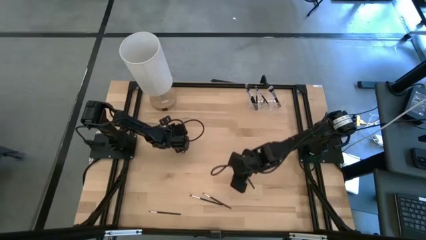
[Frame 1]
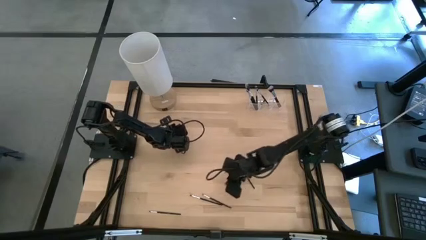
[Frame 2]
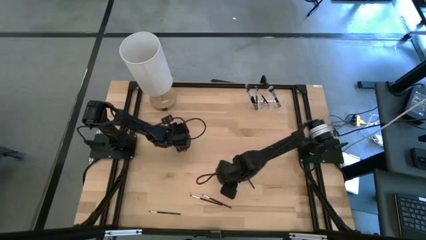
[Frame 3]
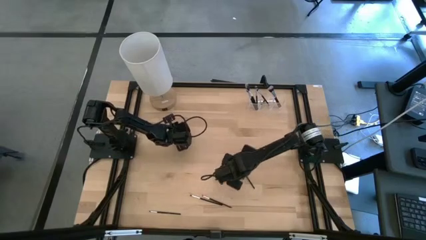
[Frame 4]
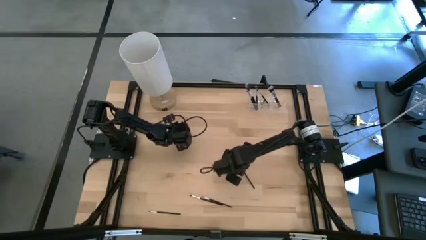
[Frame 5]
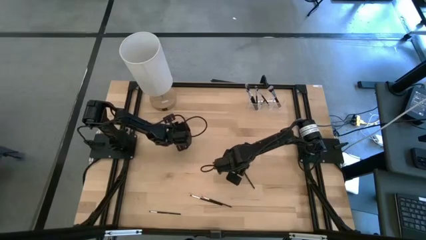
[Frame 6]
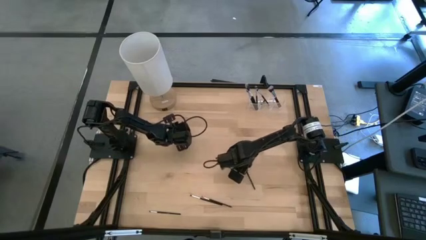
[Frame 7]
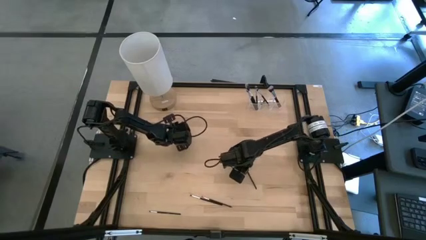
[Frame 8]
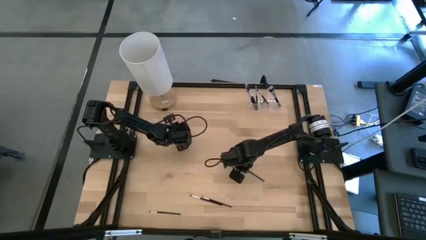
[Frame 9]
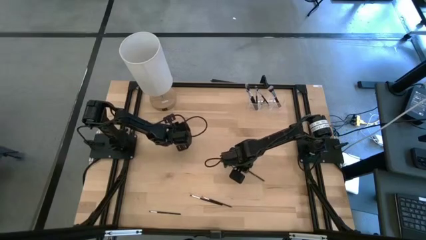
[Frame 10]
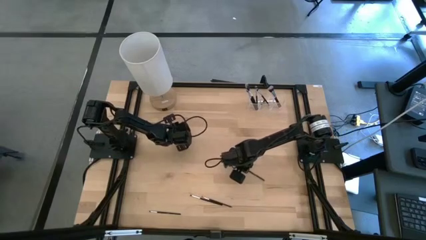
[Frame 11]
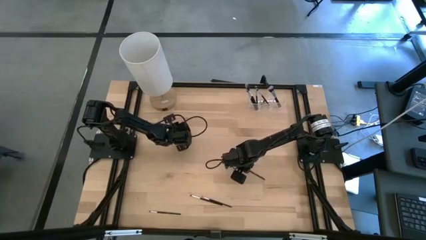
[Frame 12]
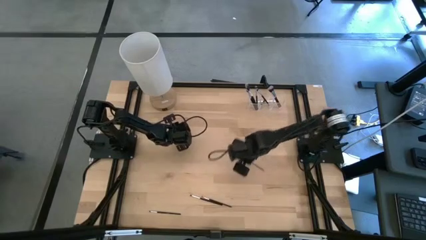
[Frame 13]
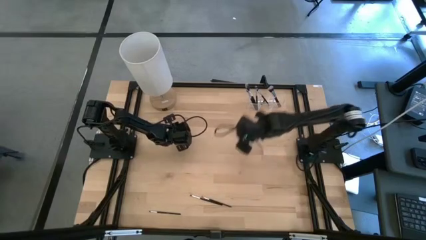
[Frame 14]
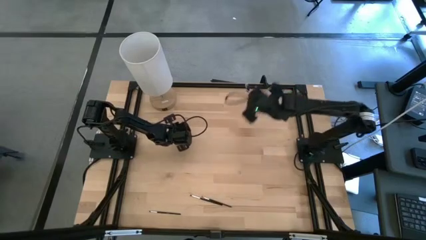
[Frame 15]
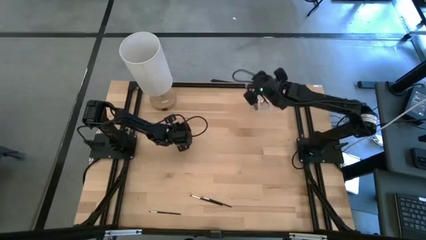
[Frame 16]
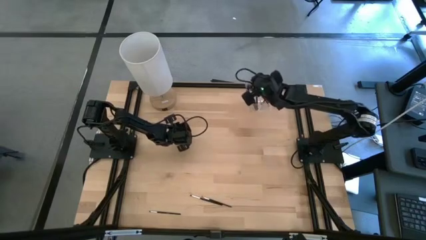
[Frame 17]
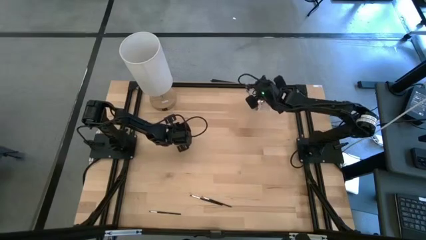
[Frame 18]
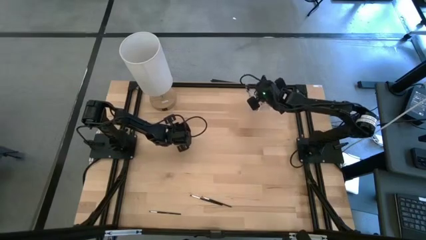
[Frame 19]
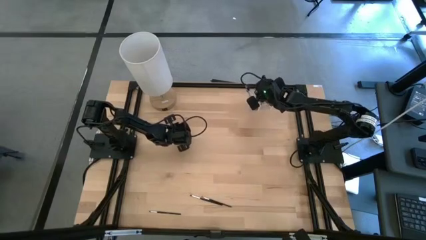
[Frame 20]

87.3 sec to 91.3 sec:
Task: Put items in baskets/containers
Put the eyeshadow brush into the middle of the transparent organizer

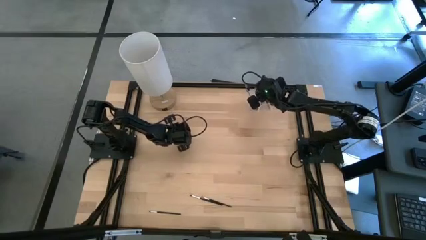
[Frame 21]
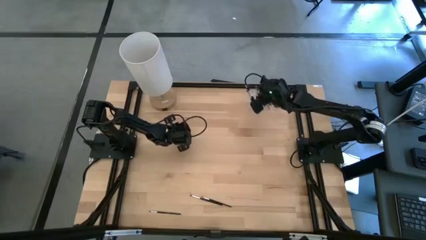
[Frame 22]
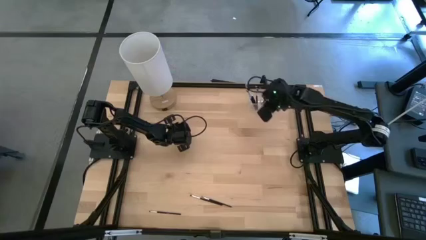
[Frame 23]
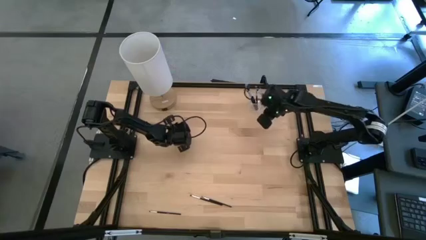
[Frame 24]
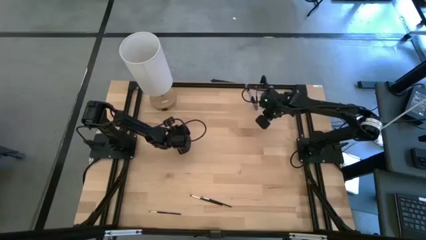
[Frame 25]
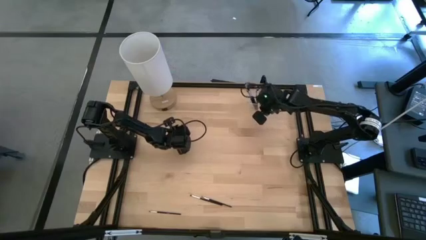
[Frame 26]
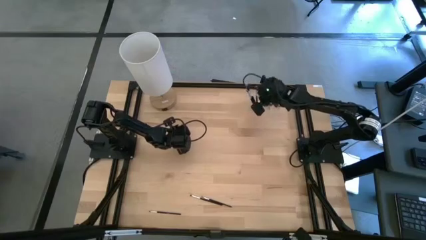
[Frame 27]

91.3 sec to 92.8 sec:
Adjust the eyeshadow brush in the middle of the transparent organizer

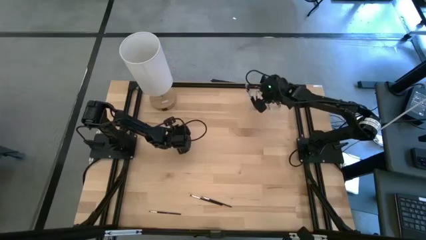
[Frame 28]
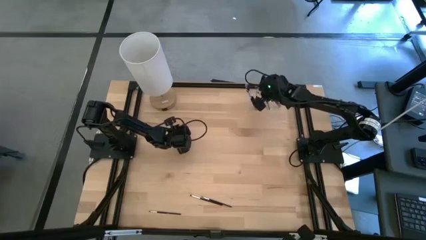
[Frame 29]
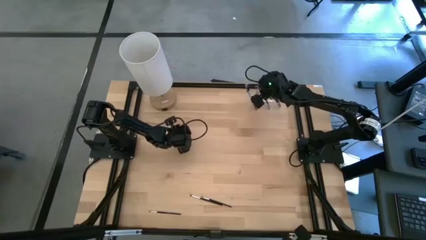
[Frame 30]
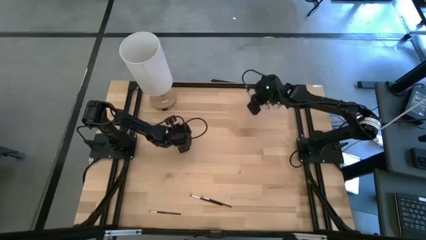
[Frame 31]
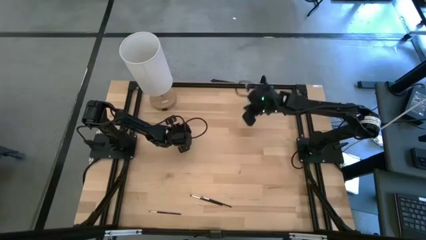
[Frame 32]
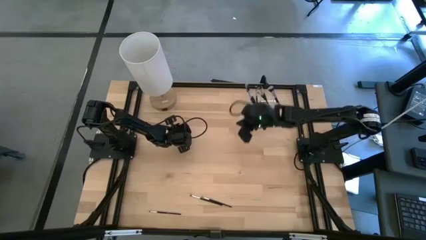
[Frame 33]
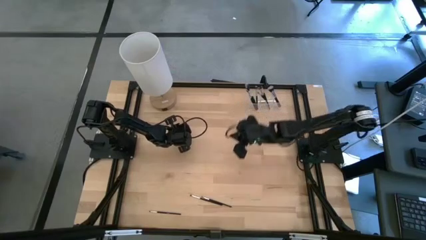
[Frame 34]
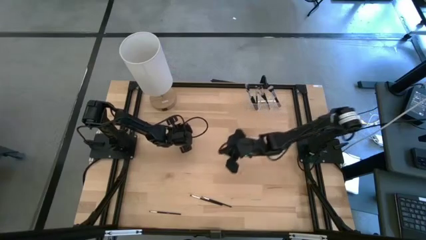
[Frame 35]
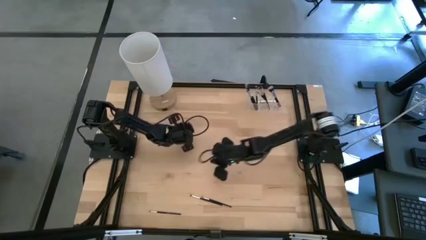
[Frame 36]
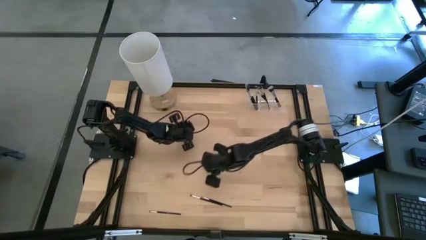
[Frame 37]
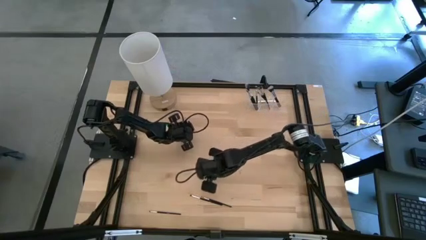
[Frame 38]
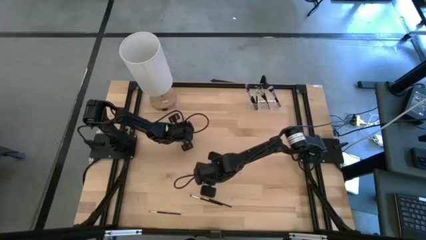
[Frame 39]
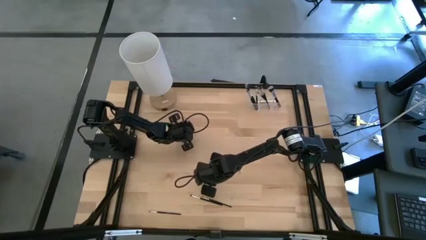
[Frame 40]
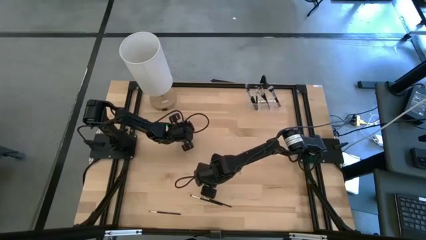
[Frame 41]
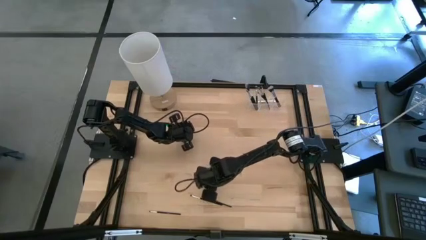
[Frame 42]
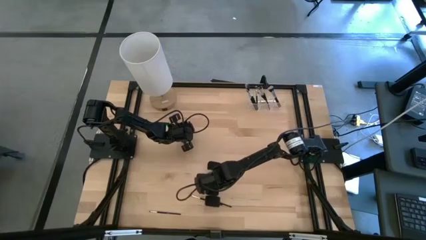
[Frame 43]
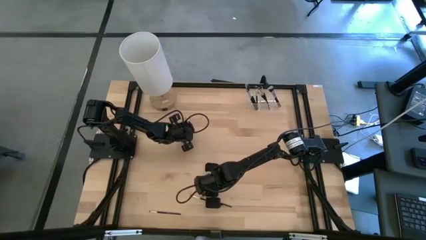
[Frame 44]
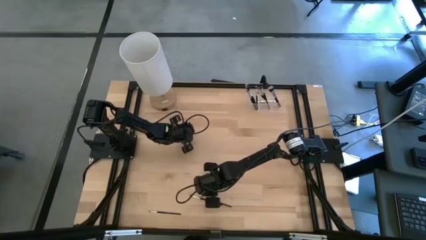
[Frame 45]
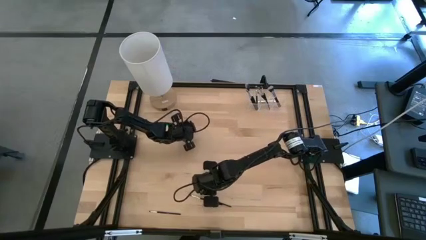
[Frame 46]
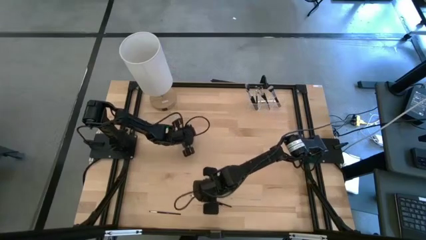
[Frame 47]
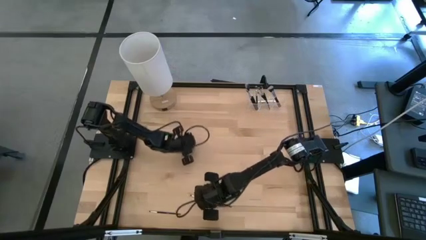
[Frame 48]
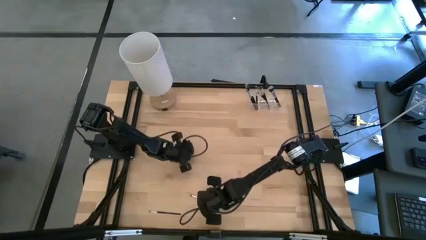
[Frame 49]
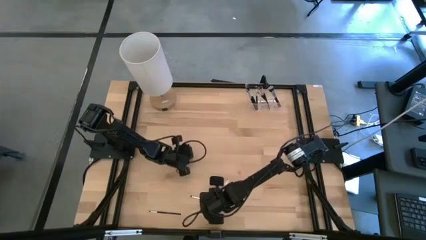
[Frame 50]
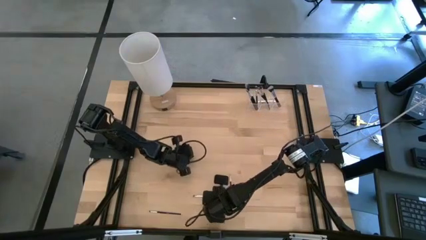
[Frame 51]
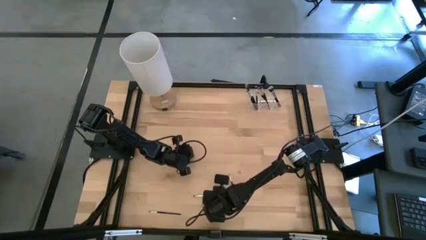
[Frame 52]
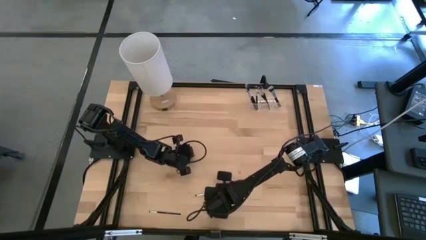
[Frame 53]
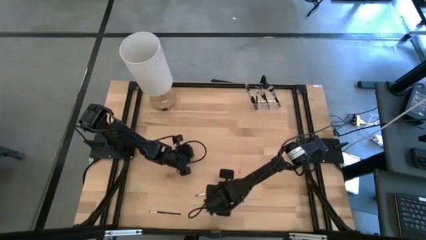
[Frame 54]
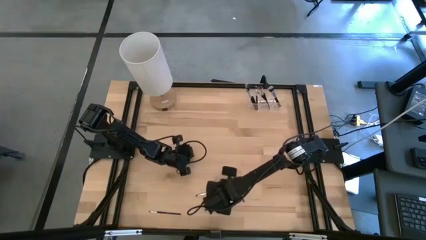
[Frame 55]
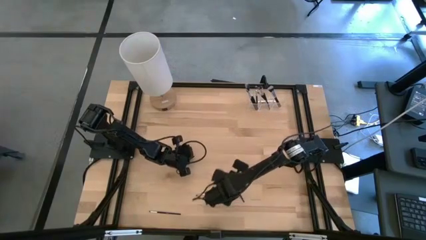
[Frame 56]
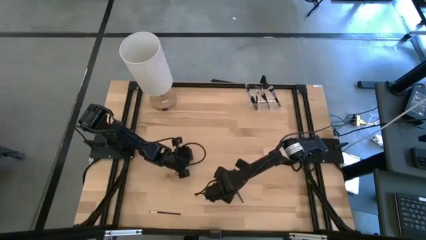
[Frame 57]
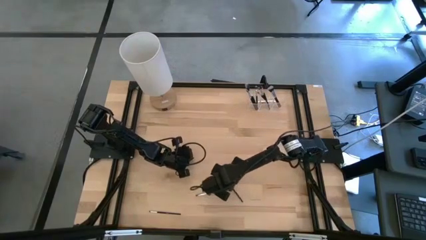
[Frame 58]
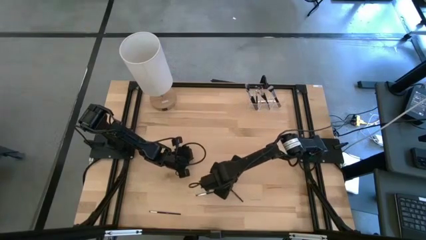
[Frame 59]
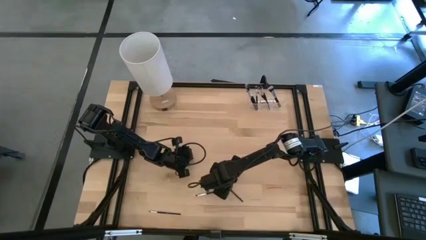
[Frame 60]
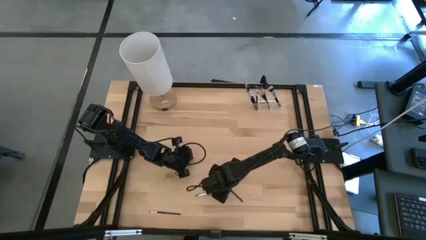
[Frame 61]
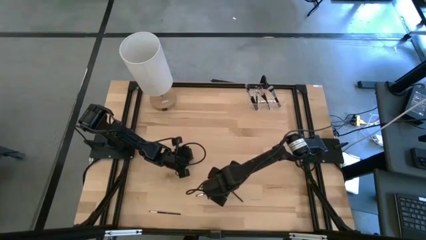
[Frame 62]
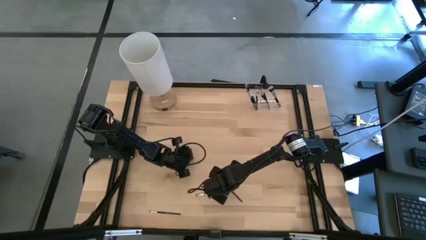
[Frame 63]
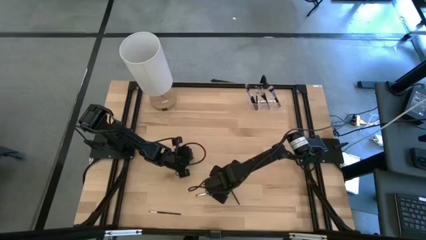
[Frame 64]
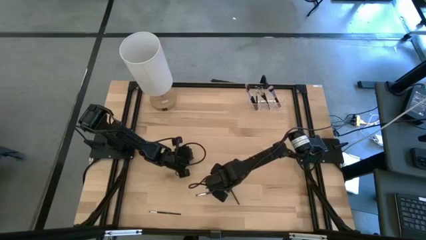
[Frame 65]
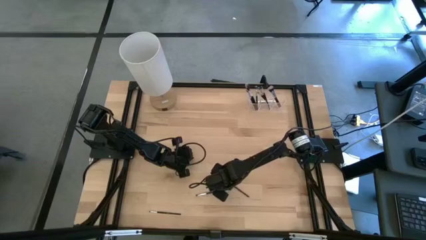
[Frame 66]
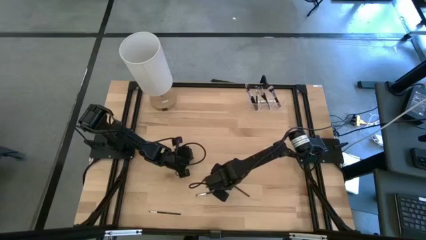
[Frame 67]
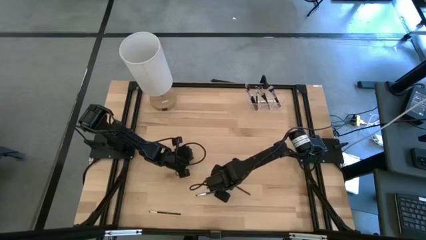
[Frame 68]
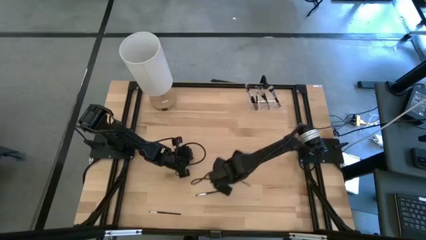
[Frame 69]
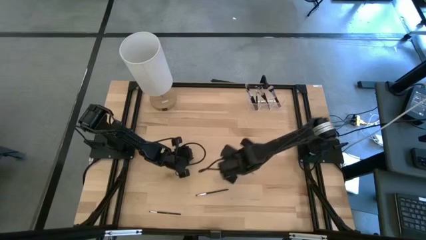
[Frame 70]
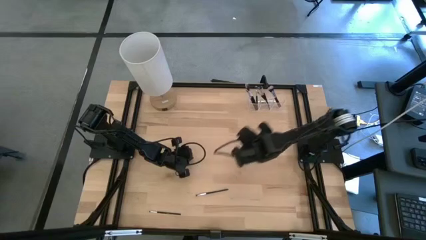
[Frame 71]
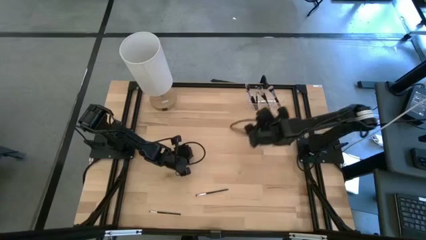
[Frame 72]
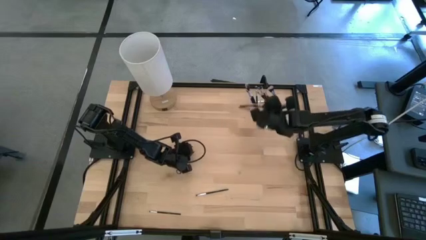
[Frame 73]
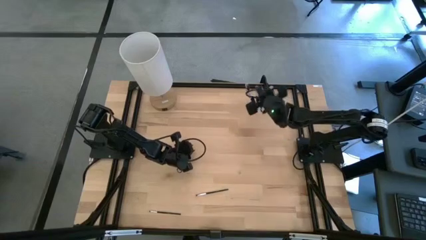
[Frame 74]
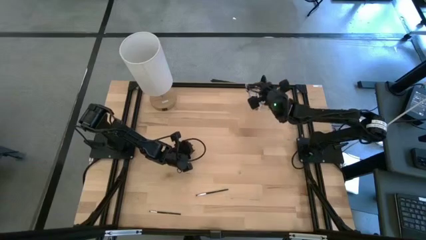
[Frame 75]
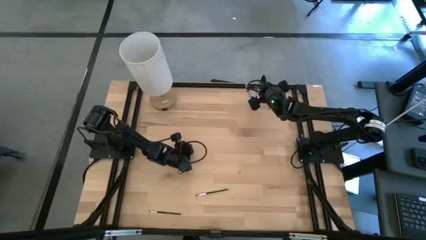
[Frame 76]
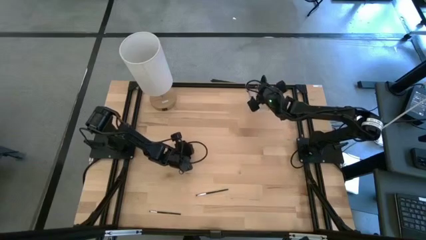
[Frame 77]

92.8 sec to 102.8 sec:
Put the eyeshadow brush into the middle of the transparent organizer

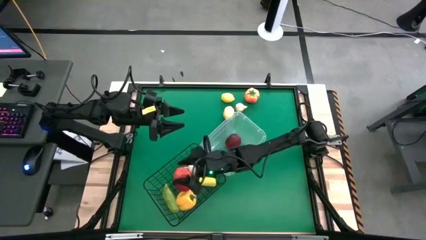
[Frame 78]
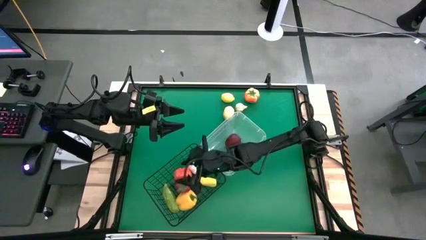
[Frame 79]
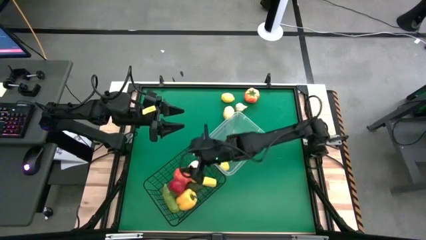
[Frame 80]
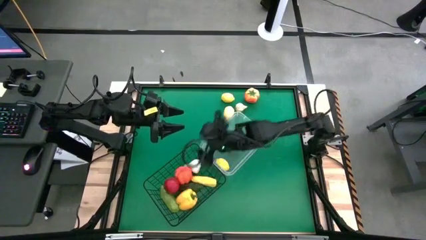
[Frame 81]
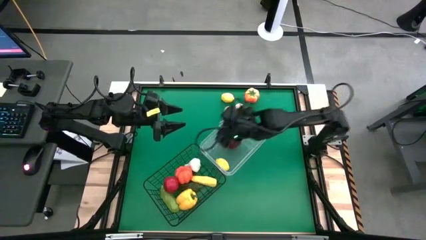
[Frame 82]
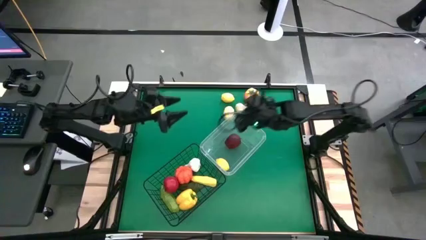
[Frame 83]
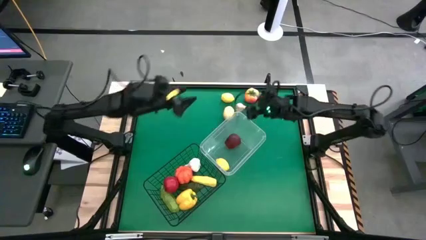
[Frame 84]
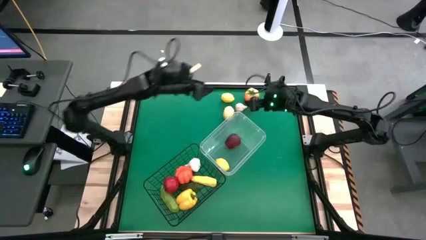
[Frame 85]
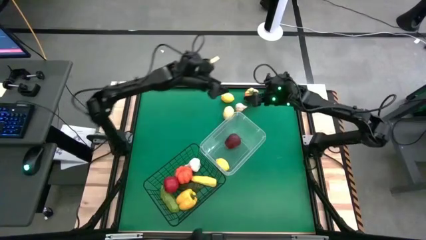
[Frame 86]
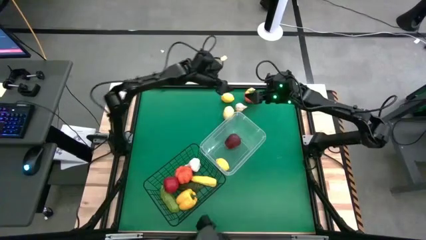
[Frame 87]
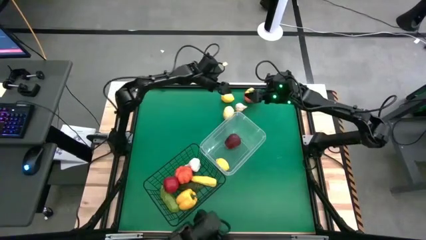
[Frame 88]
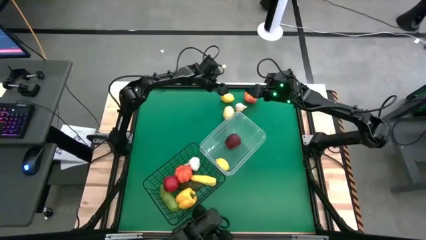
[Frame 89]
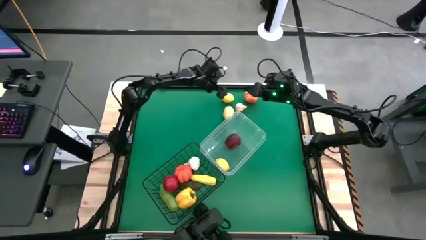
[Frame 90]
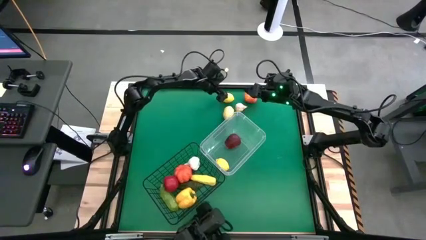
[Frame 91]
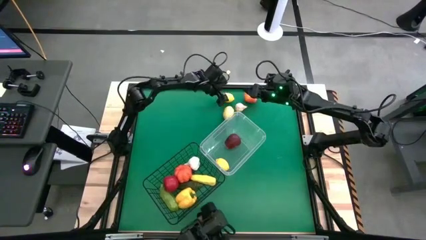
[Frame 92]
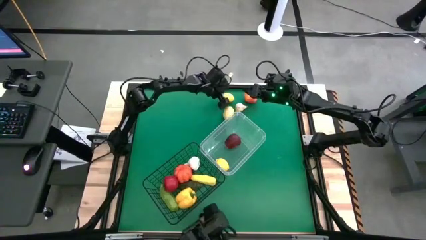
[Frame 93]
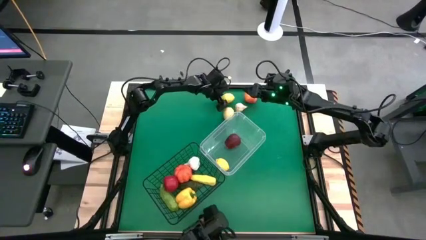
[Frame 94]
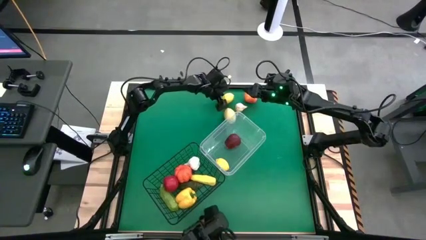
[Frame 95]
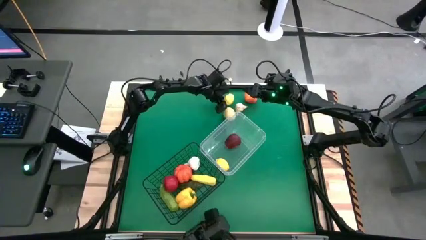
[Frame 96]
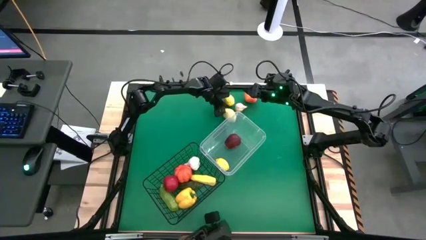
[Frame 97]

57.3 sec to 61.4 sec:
Task: Sort produce into baskets
Put the top lemon into the transparent bin
